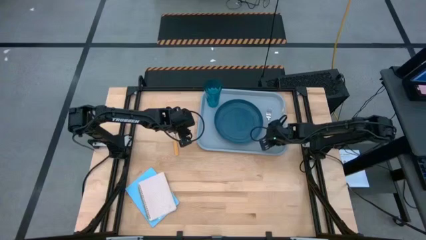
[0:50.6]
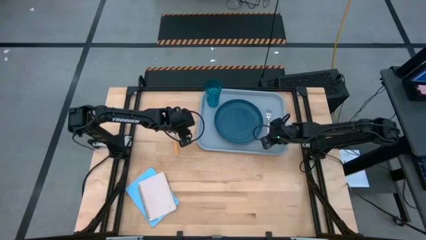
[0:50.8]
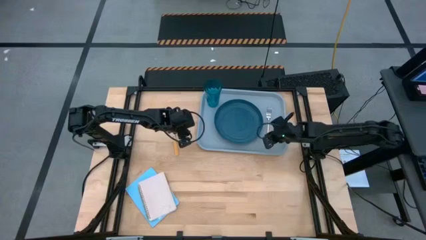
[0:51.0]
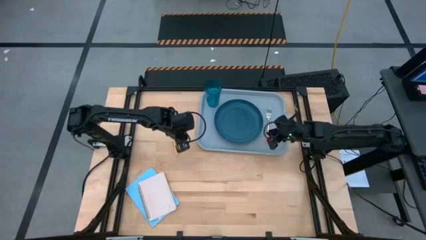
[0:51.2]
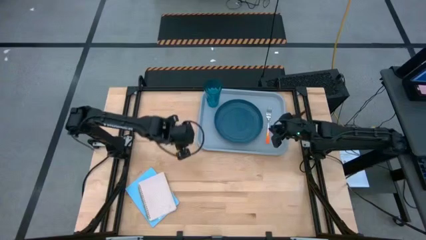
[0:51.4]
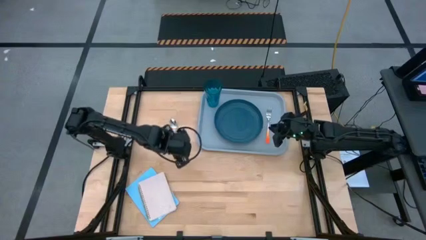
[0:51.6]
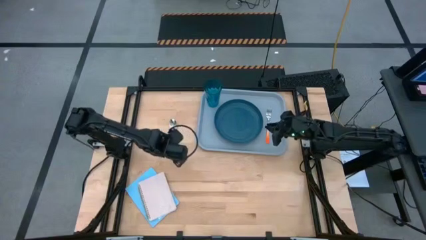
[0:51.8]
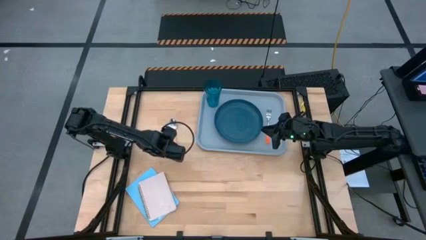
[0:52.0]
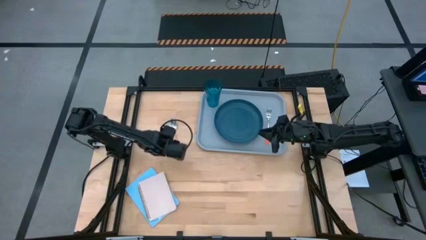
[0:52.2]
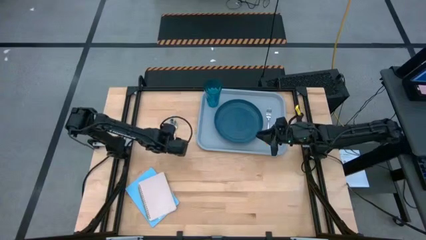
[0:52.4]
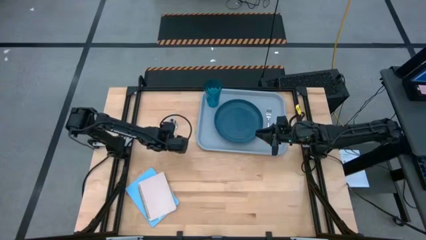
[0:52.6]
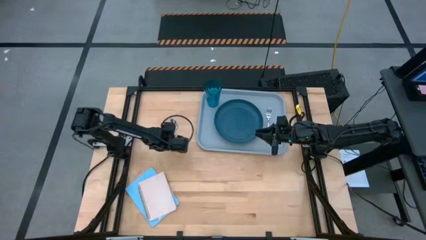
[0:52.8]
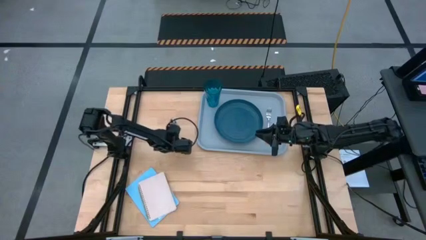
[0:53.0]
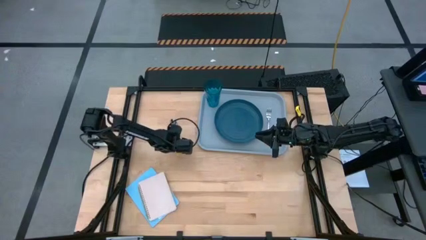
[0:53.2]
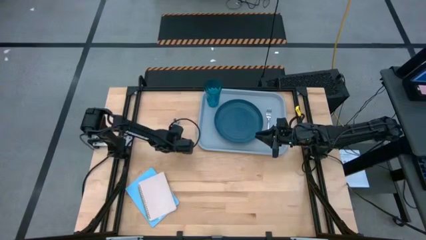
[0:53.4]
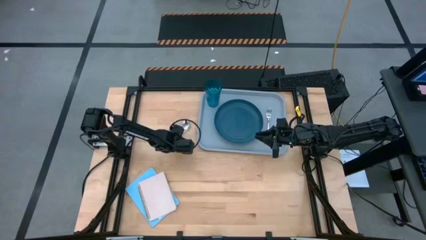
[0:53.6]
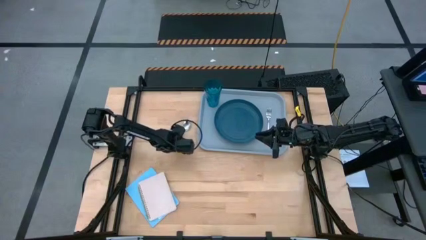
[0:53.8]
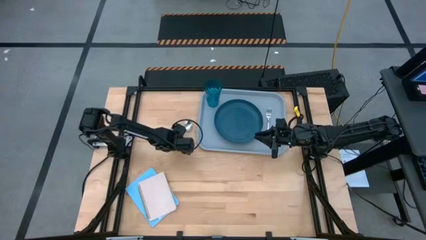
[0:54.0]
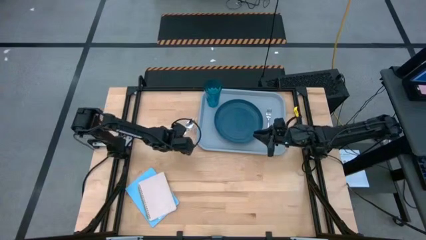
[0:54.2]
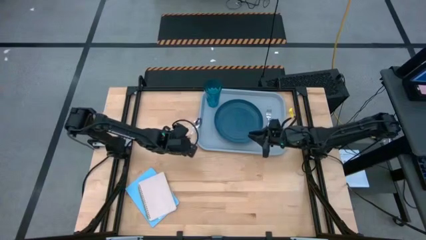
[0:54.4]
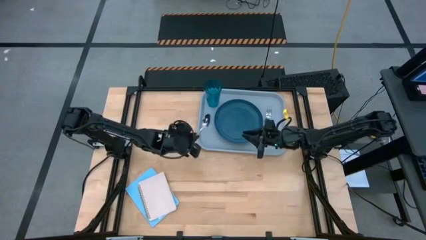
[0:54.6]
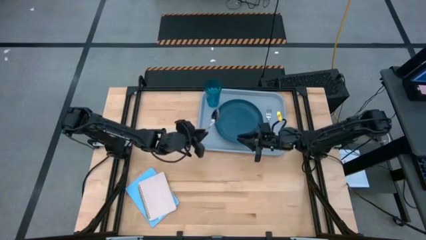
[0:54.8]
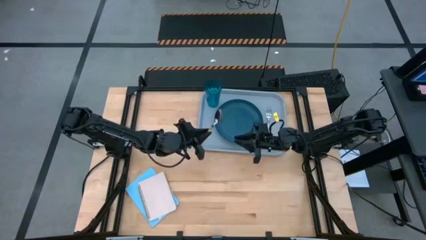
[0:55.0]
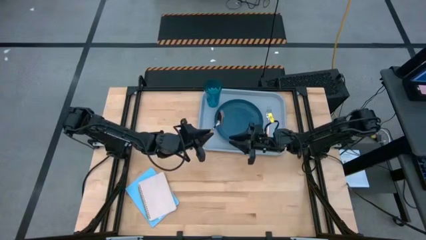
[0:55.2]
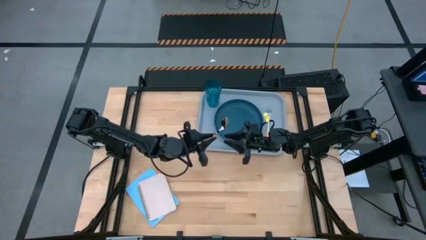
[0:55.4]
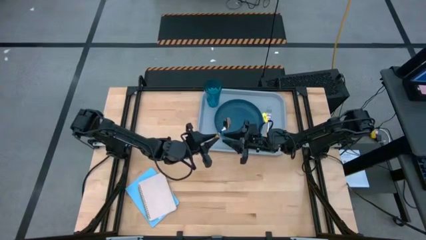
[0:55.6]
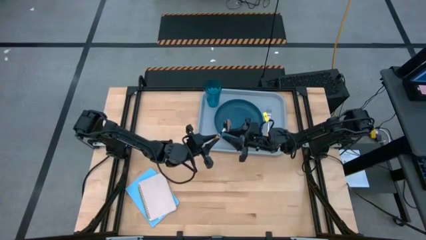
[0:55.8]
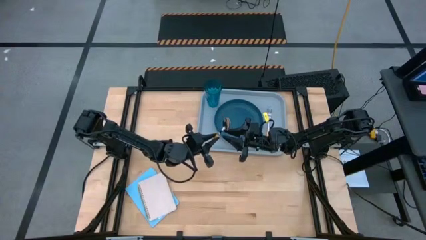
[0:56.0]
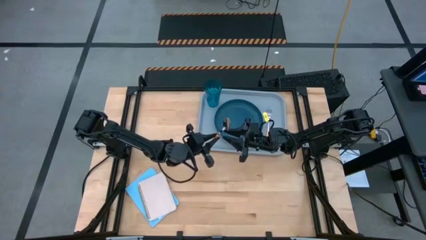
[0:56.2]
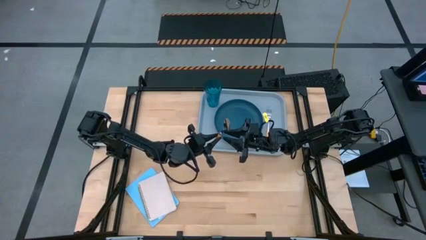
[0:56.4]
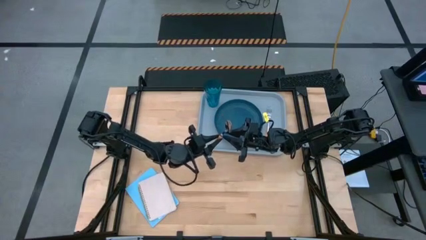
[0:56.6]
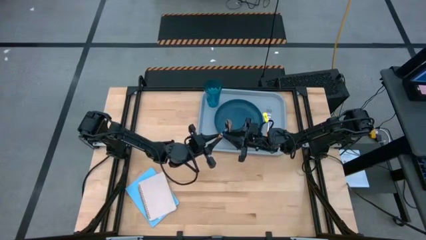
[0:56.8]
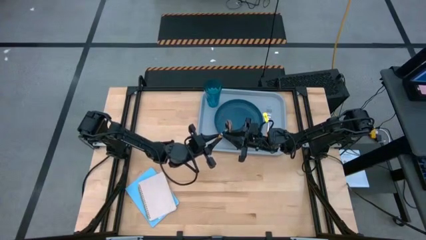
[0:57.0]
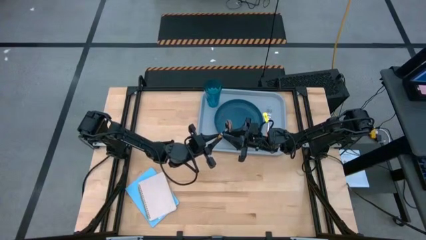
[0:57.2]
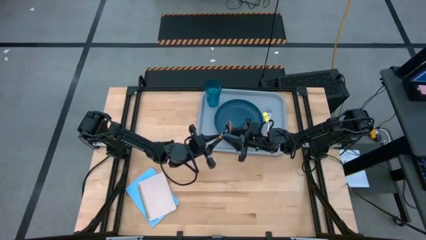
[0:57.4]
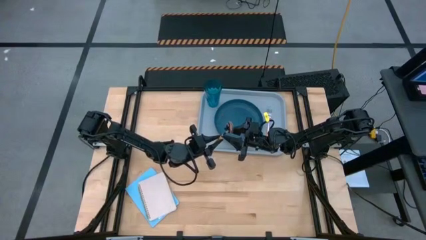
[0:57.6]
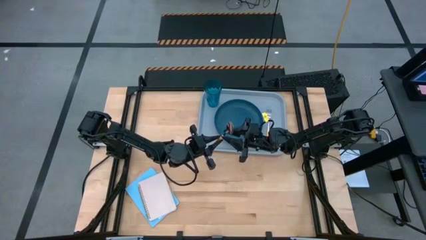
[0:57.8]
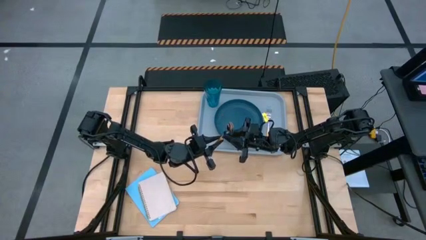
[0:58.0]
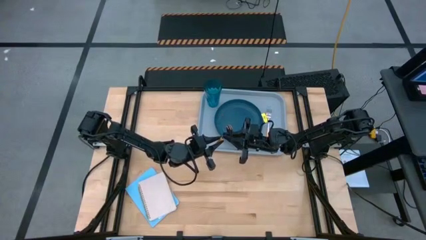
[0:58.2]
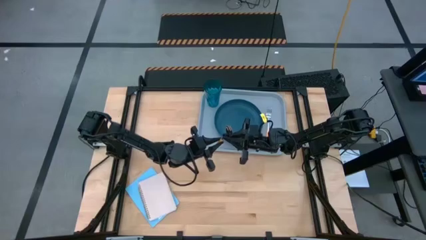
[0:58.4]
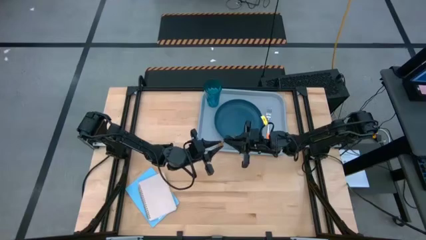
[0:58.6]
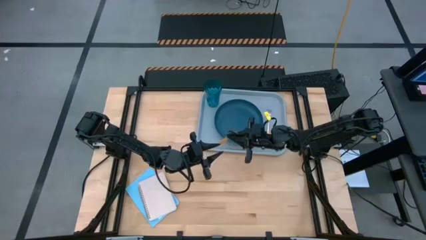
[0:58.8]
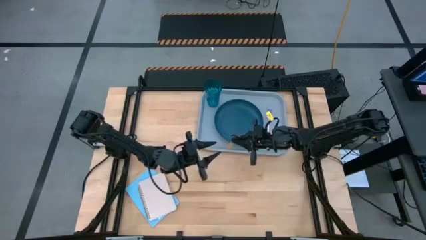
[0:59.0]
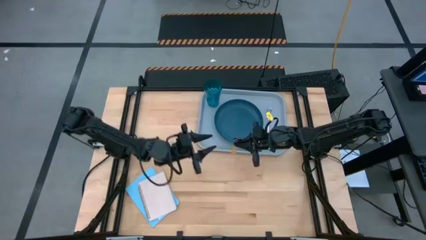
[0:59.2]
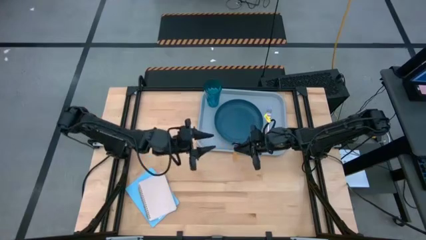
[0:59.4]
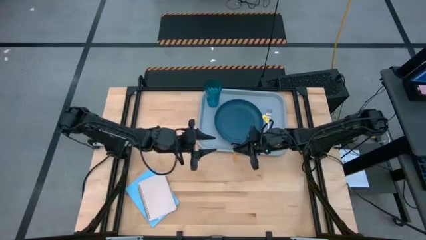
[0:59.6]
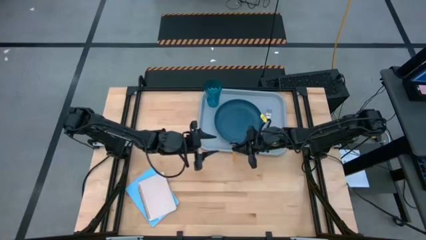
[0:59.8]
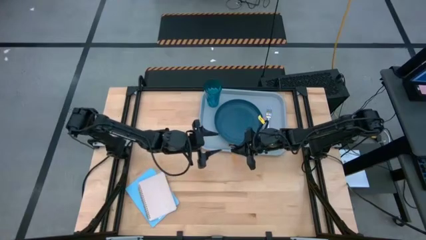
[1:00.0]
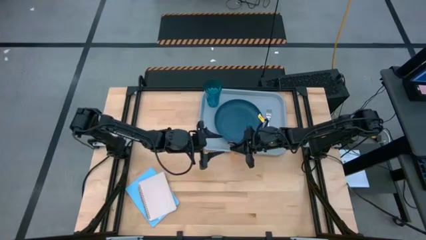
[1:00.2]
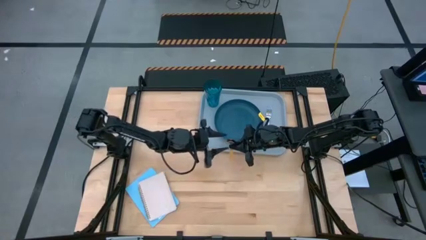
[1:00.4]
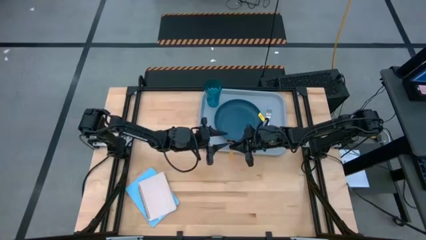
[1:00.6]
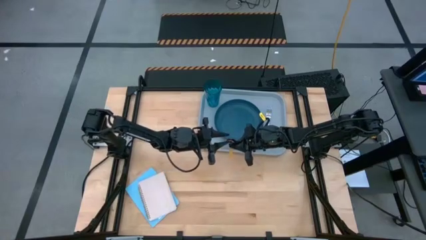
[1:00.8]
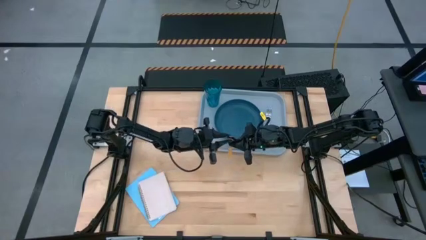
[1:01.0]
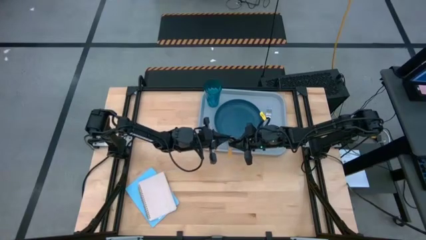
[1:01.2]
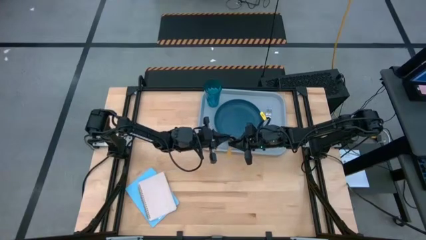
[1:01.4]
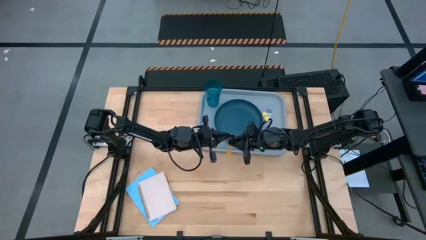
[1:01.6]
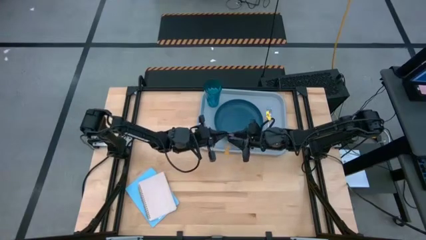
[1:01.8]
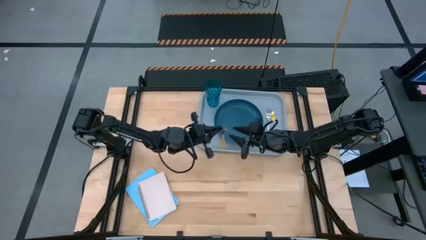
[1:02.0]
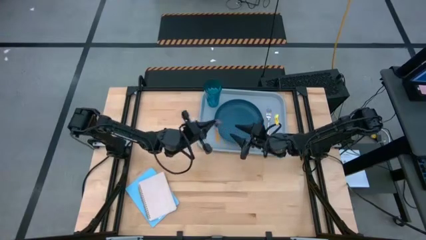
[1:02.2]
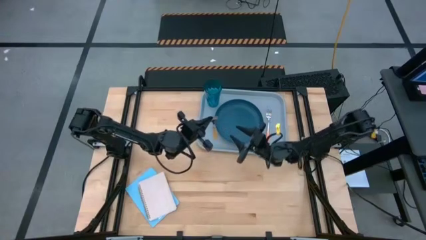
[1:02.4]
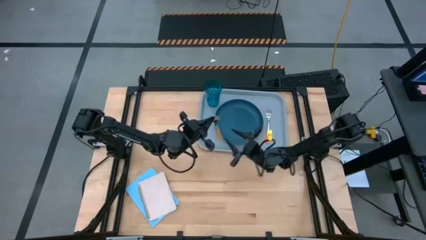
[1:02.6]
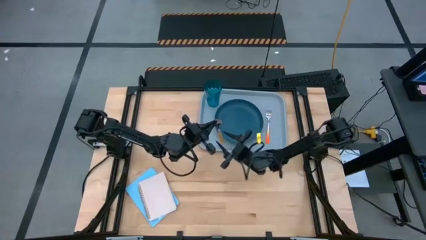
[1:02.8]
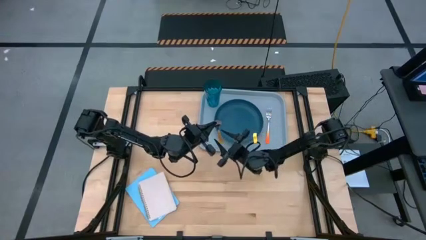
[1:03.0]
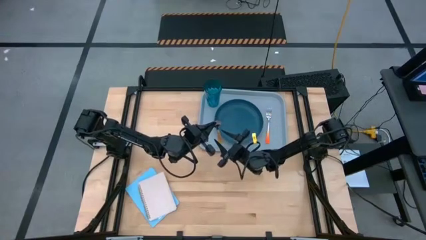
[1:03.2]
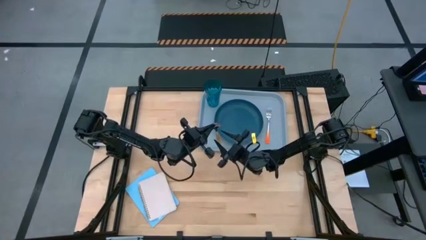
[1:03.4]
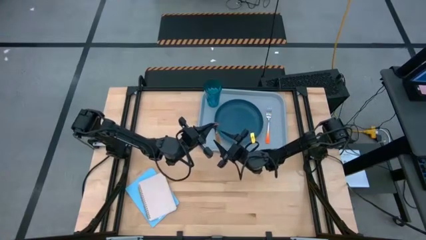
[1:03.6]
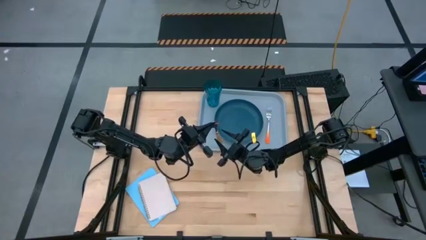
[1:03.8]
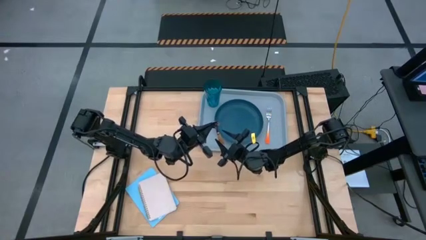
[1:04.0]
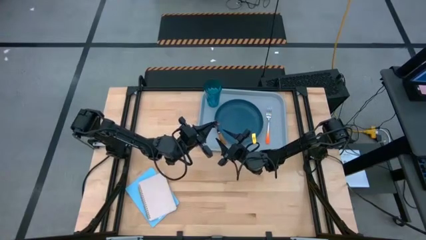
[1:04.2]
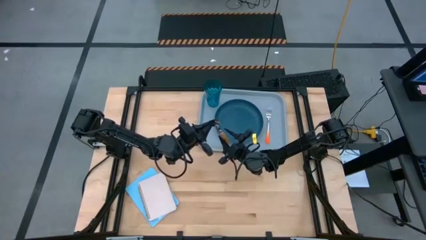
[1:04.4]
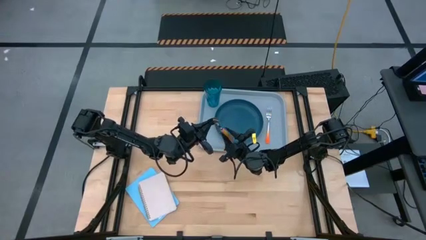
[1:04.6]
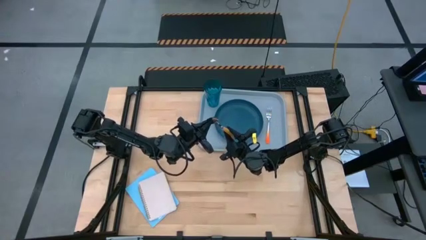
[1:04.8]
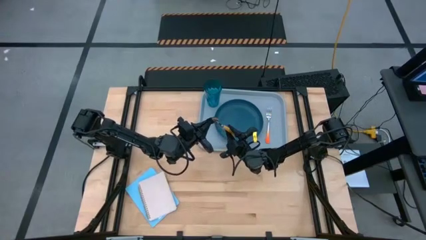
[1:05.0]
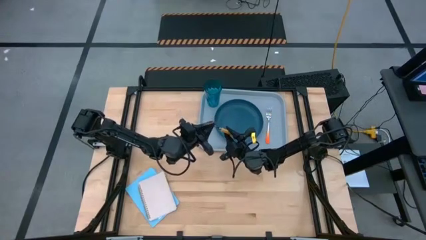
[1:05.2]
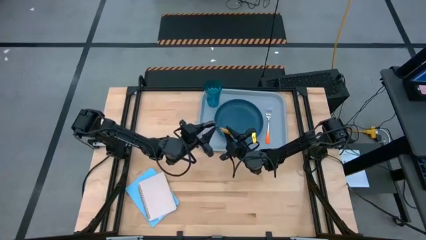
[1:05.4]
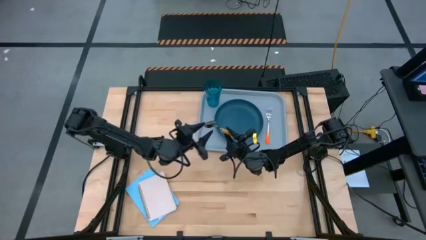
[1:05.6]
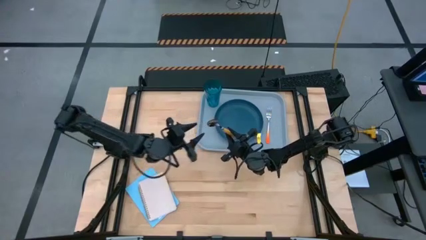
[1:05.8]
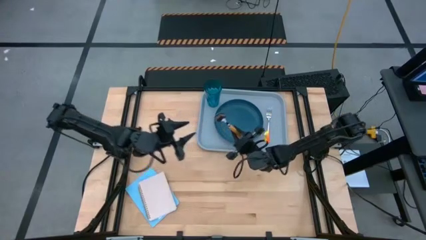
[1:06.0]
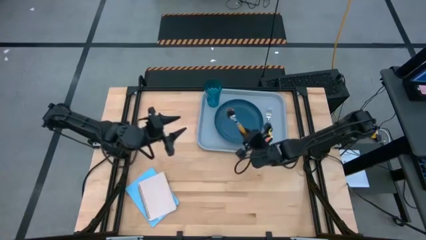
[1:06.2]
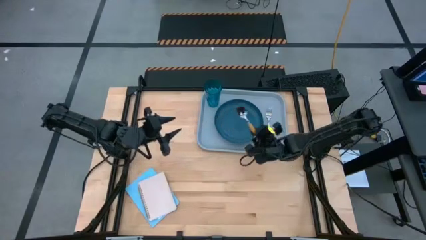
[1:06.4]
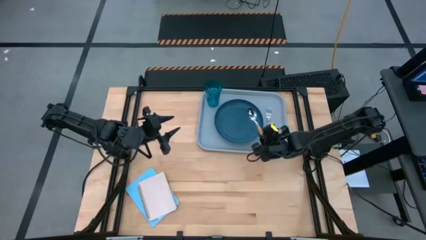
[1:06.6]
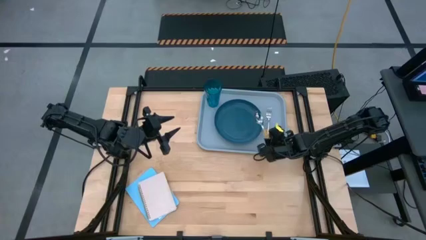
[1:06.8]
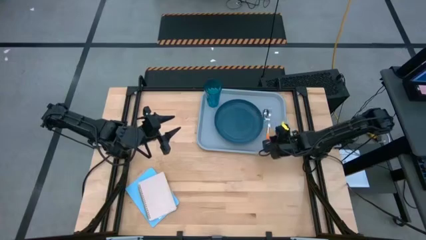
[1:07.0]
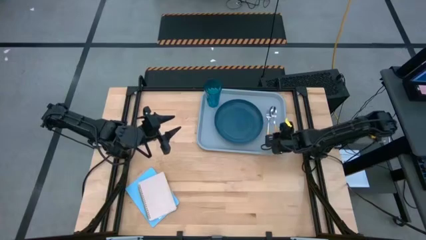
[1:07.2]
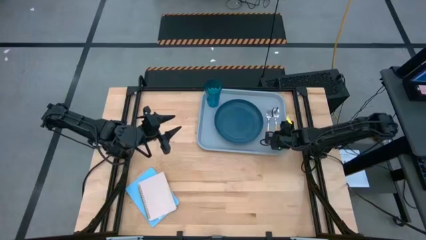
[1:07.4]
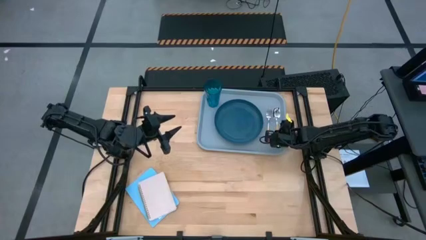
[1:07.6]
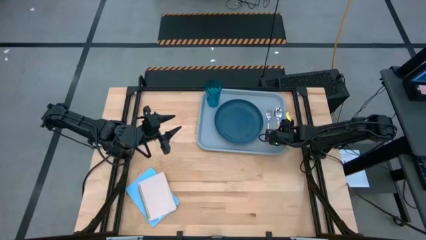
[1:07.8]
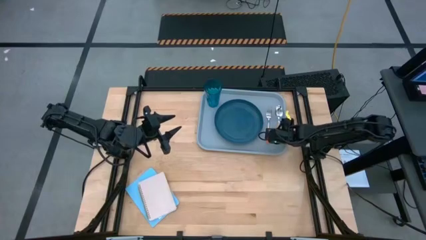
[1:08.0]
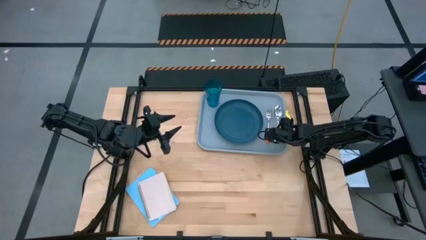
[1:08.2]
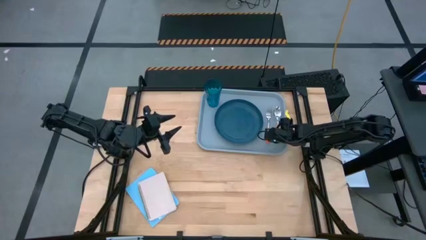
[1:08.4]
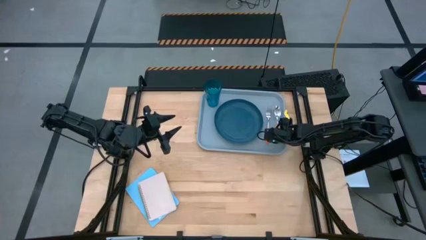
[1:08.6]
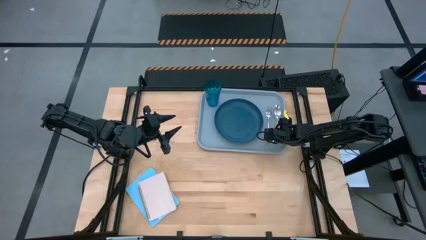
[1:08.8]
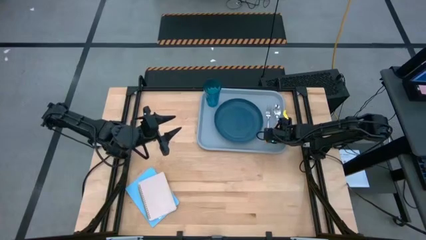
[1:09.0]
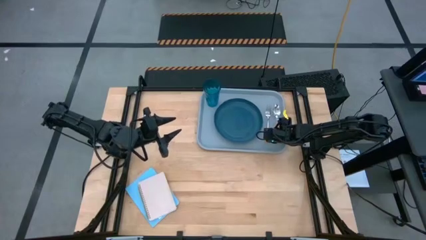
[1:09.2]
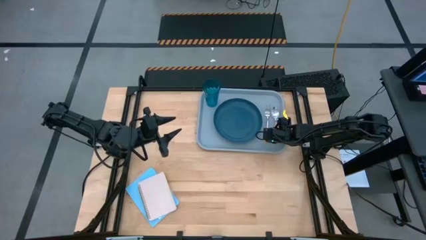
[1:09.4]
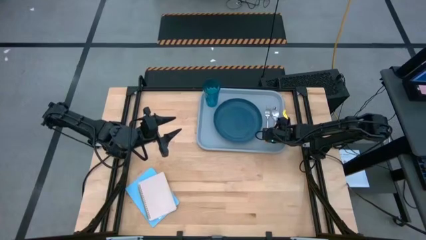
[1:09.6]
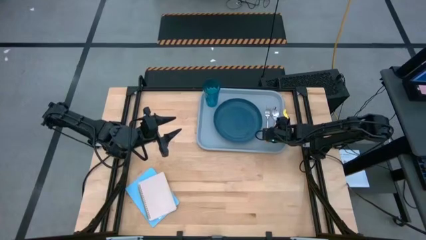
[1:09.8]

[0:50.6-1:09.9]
Task: Pick and place plate/cup/fork/spoon on tray
Put the orange spoon on the gray tray to the right of the orange fork
